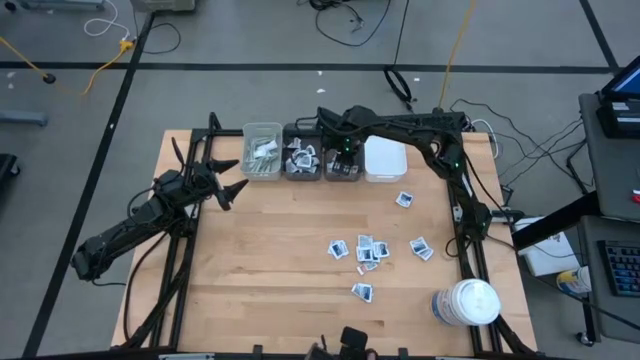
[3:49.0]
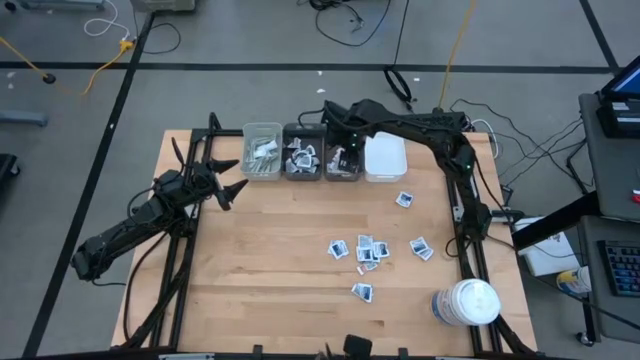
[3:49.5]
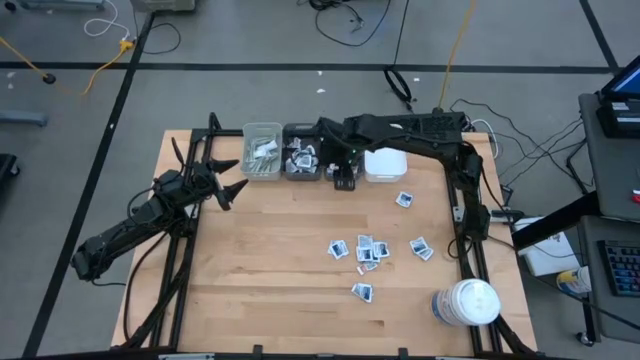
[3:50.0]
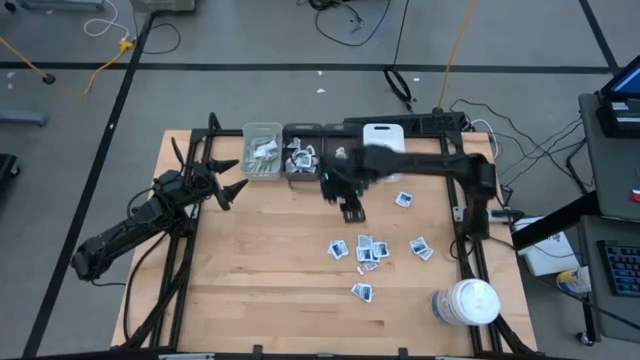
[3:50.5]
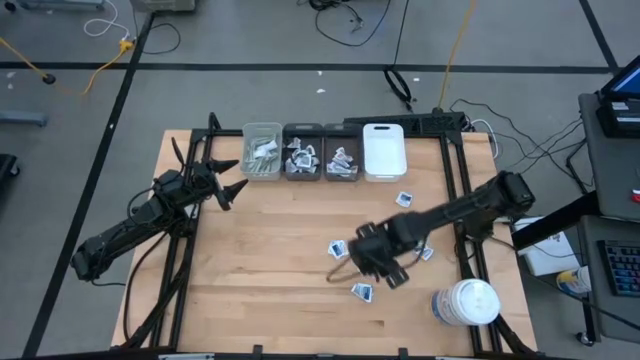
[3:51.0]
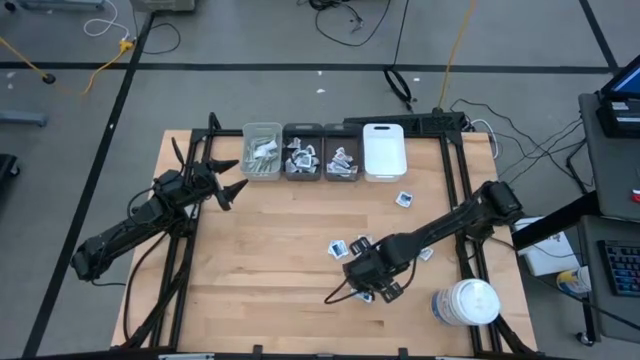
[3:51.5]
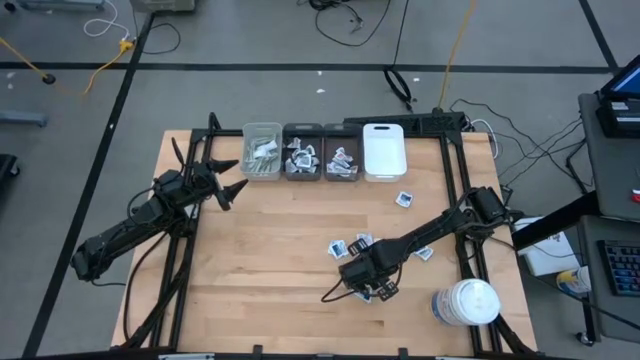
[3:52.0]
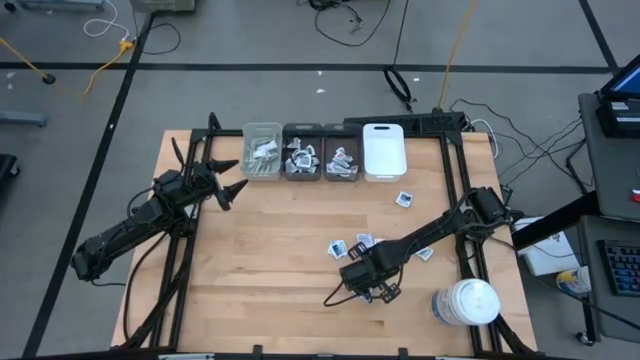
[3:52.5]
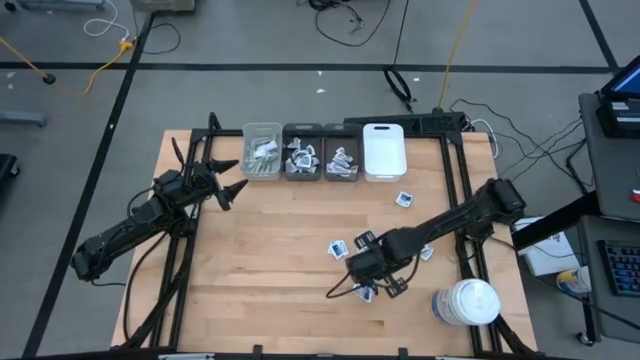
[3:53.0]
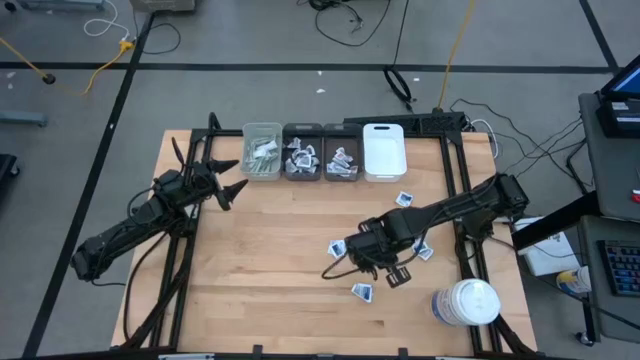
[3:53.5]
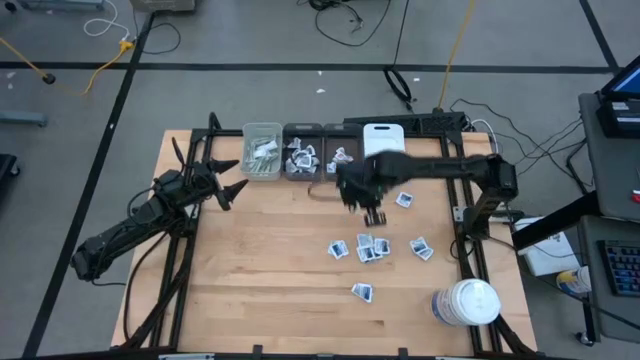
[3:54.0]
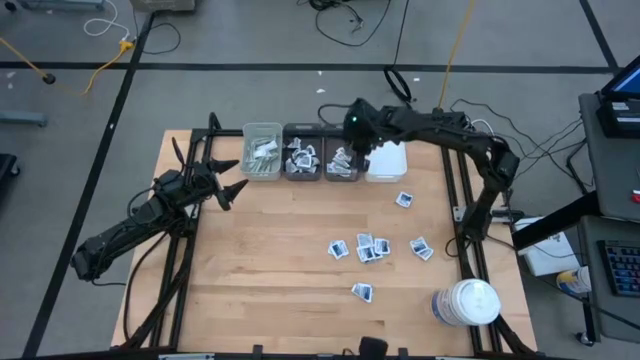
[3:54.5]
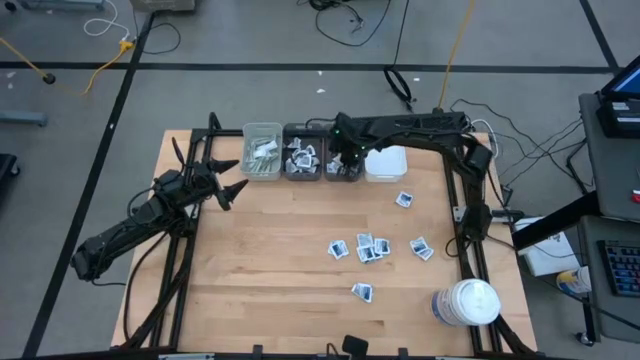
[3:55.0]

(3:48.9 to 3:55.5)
Task: Pick & Place First Aid Supplies
Put the ointment pack into the right black bin

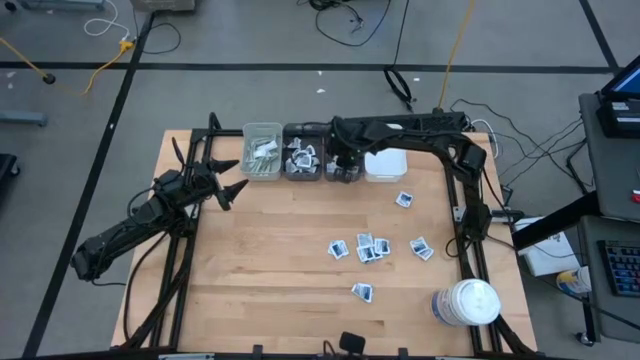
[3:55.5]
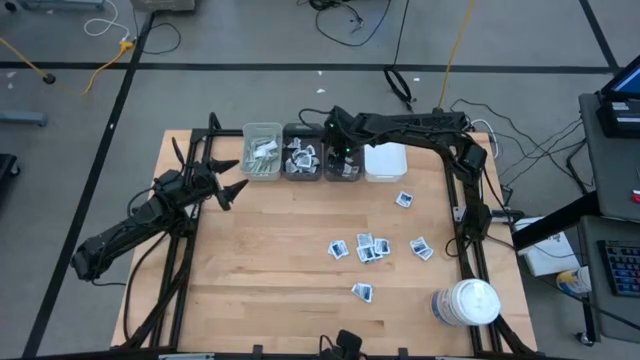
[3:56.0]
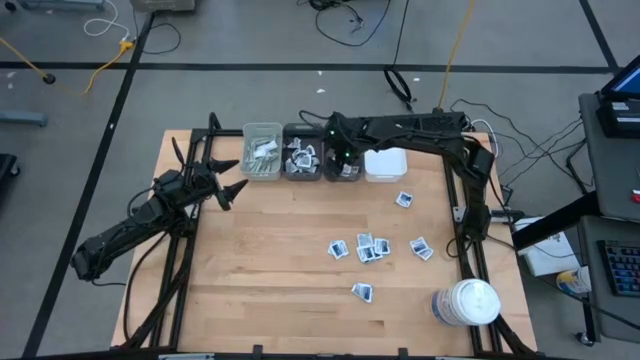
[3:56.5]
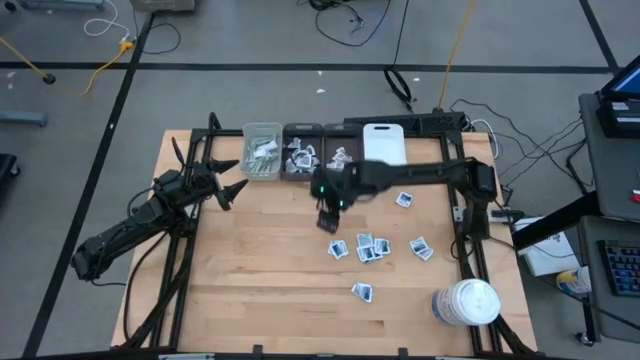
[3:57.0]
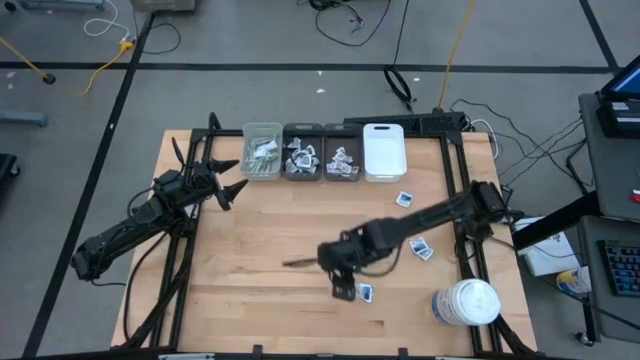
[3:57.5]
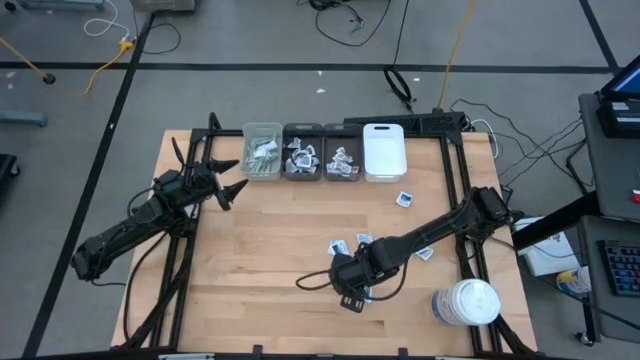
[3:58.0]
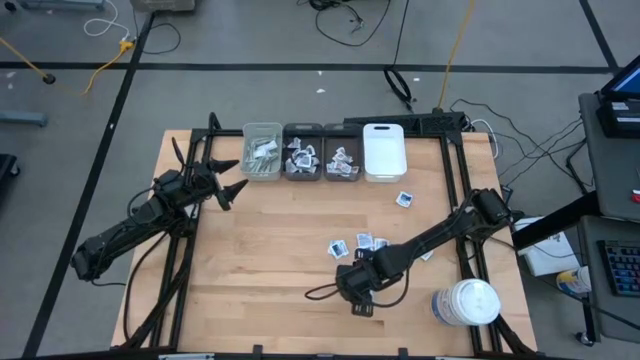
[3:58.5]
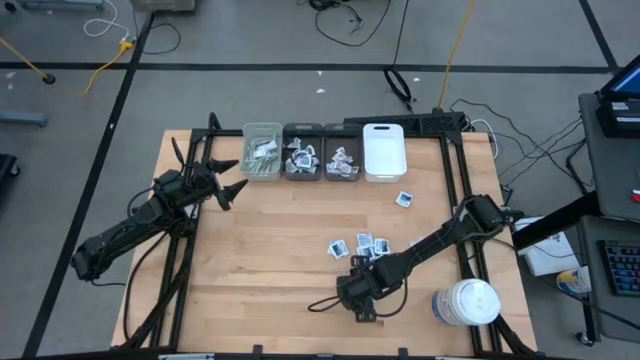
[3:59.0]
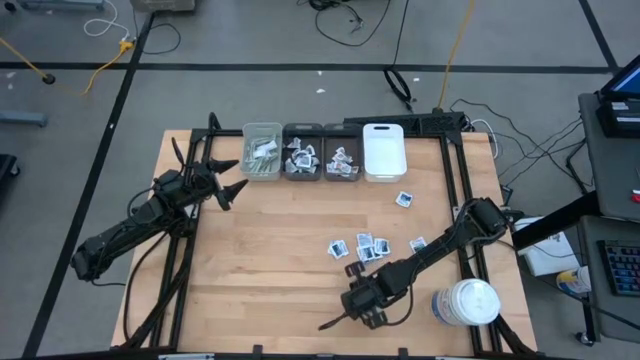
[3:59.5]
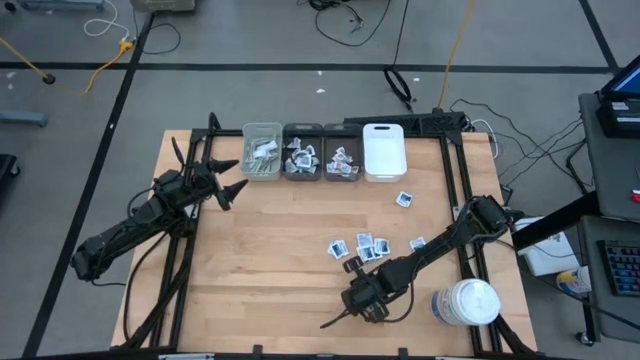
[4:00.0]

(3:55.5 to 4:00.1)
Put the ointment pack into the right black bin

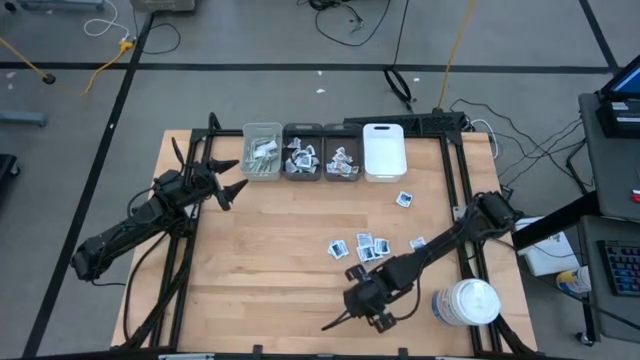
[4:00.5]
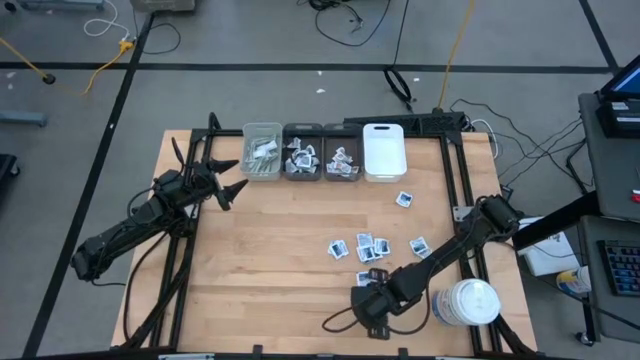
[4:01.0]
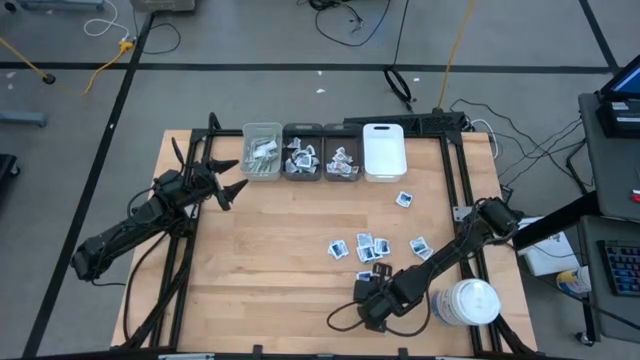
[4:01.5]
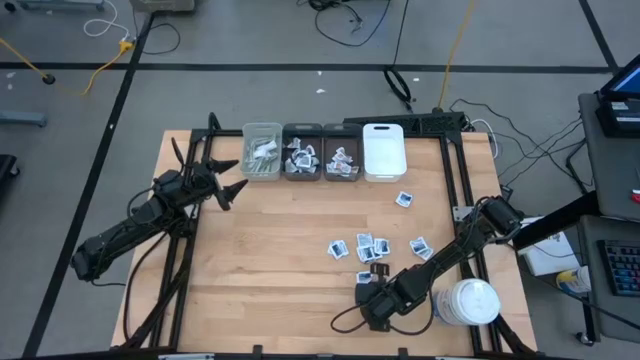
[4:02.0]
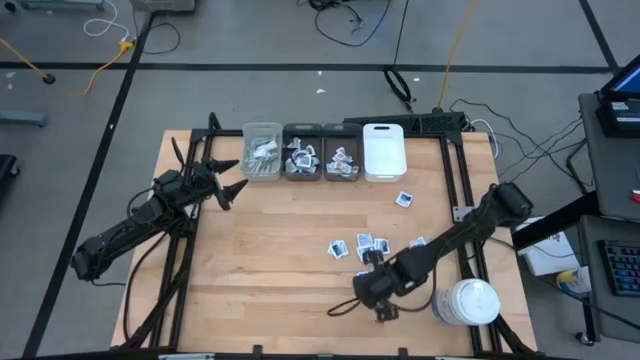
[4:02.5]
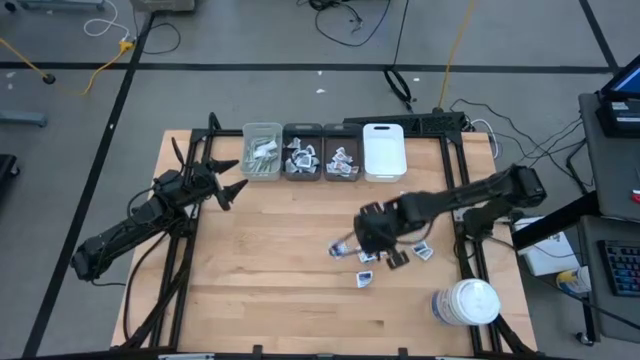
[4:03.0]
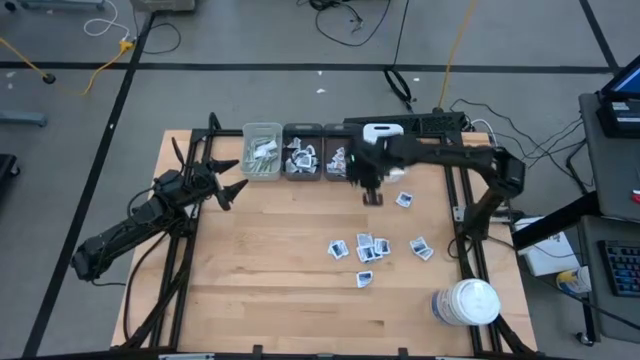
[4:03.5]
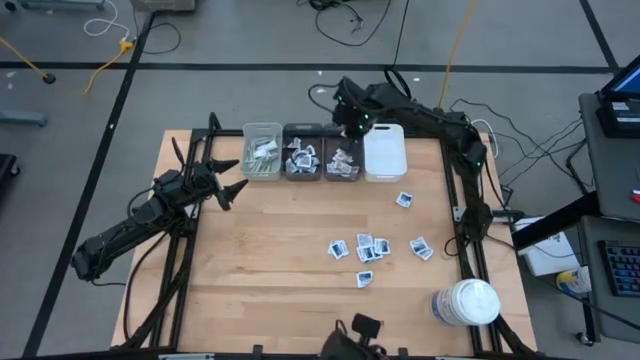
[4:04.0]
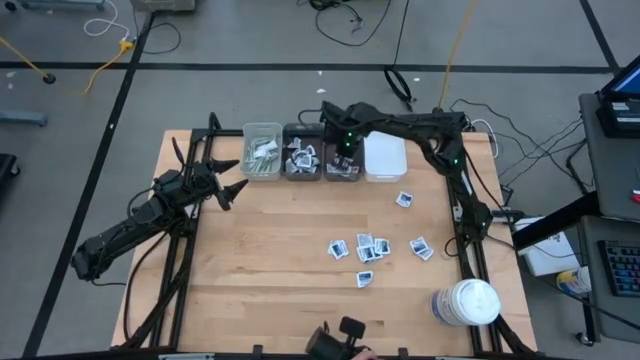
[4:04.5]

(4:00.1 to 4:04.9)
Put the ointment pack into the right black bin

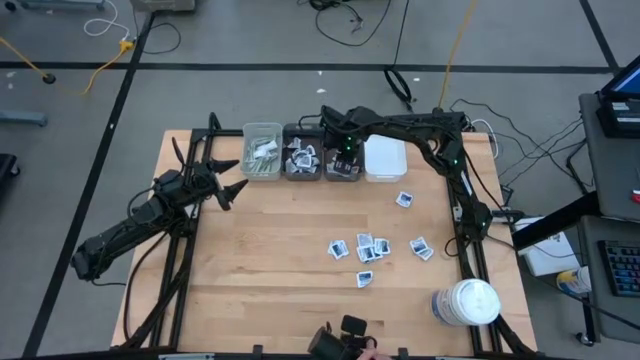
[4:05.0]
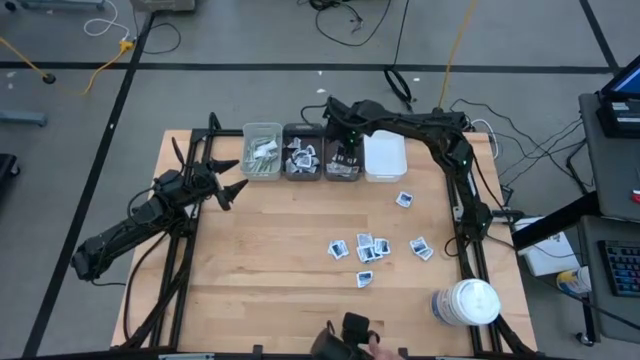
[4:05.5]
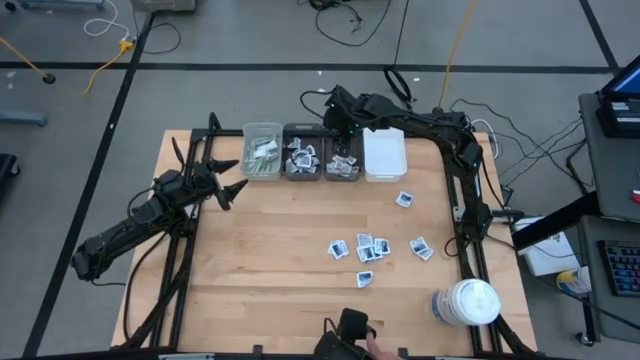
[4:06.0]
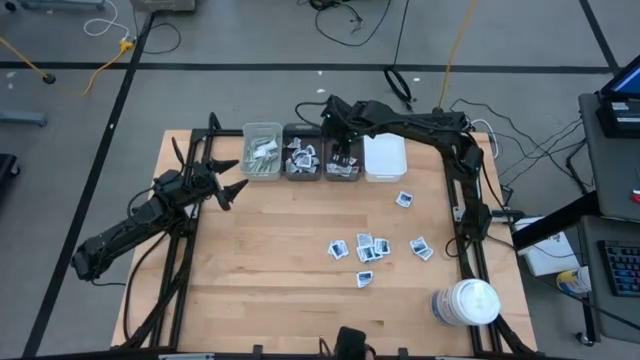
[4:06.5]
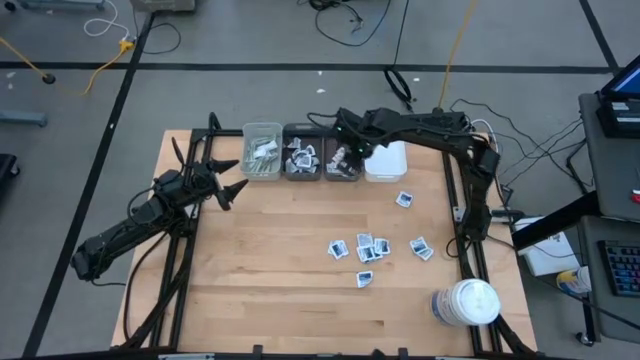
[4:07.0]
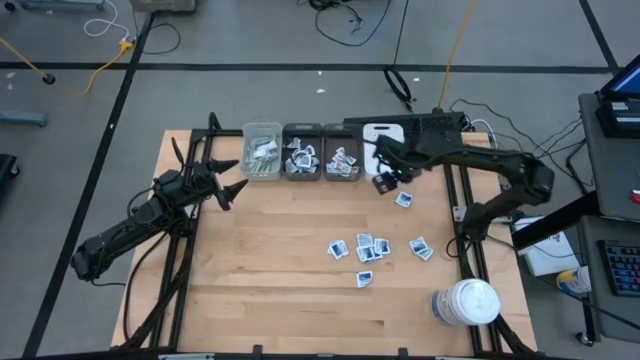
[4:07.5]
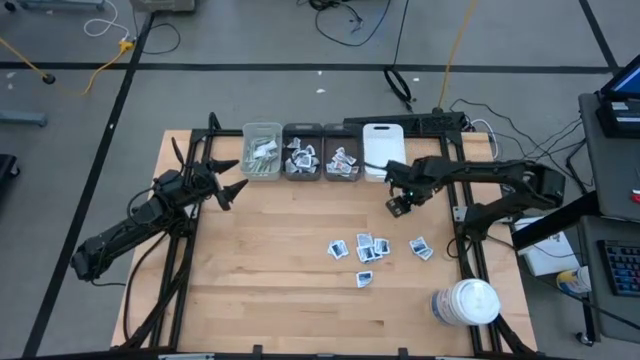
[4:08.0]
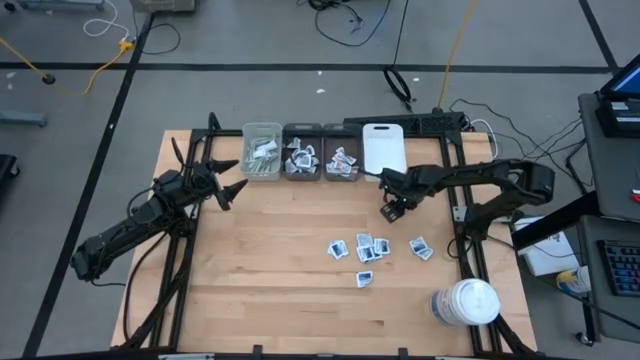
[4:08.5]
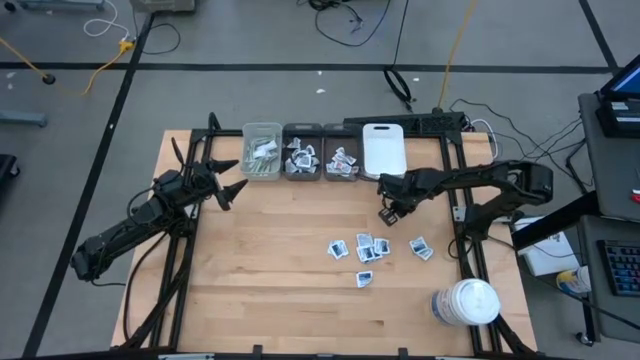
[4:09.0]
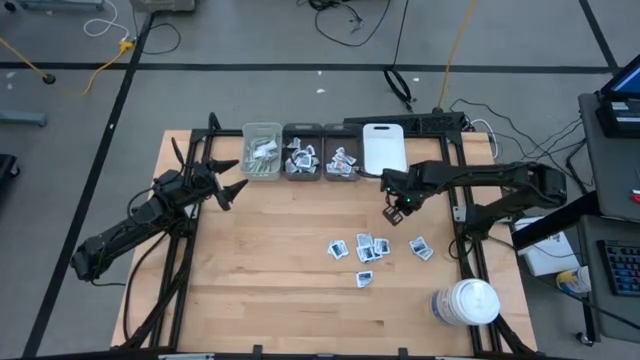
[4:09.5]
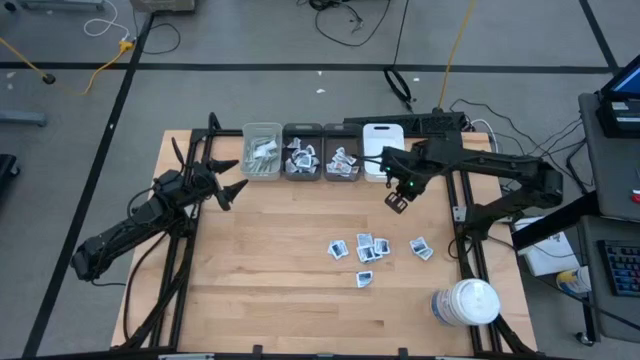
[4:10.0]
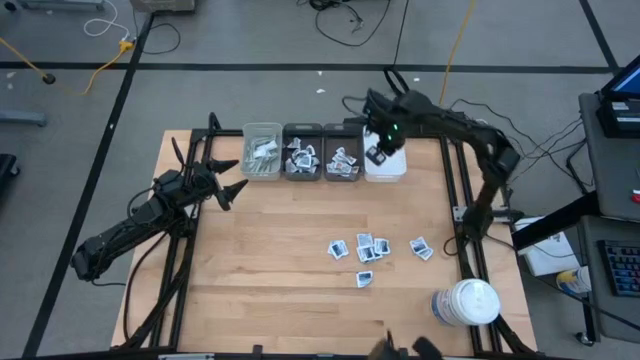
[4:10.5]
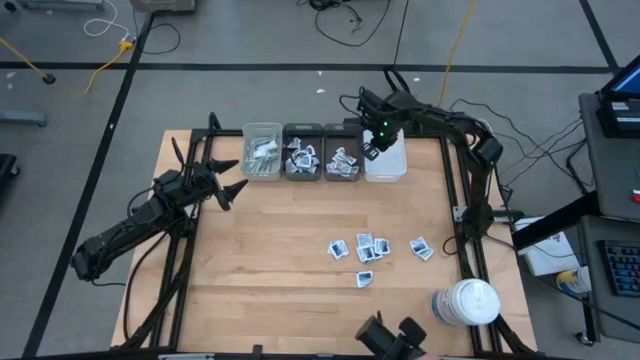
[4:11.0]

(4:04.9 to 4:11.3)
Put the alcohol pad into the white bin
